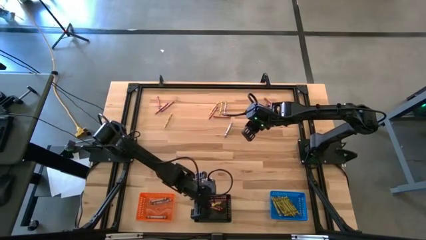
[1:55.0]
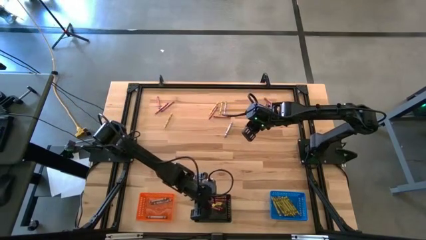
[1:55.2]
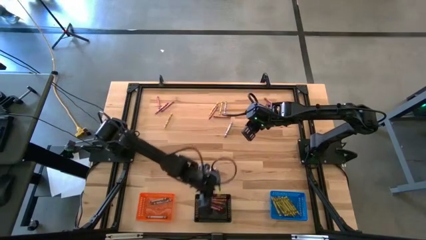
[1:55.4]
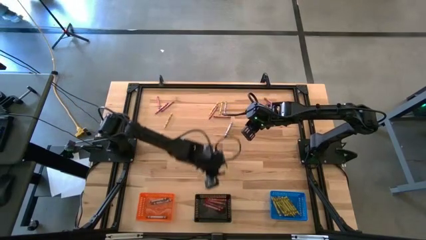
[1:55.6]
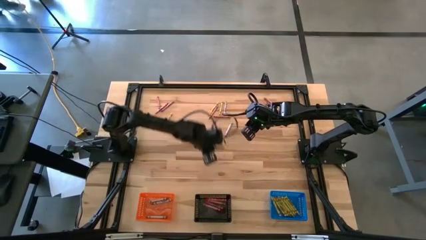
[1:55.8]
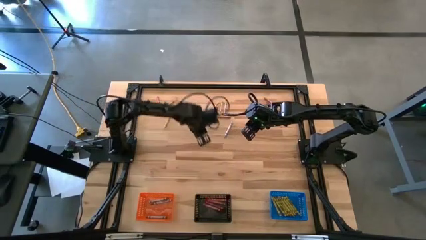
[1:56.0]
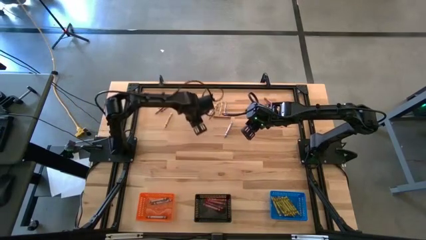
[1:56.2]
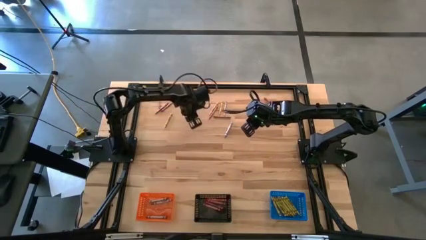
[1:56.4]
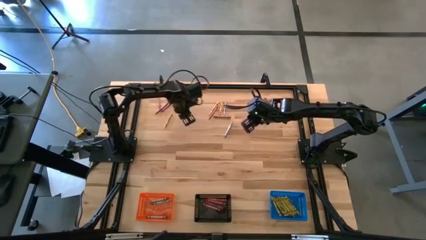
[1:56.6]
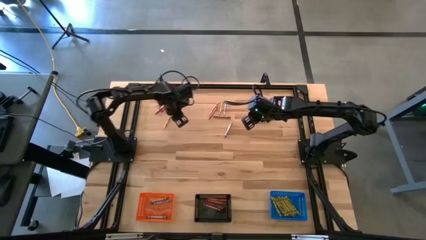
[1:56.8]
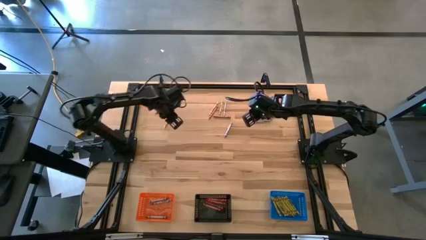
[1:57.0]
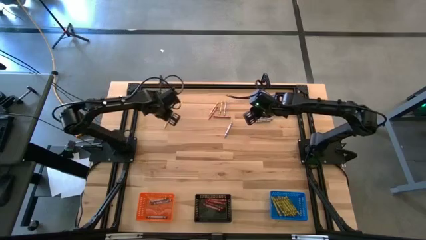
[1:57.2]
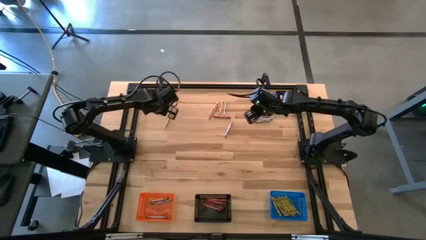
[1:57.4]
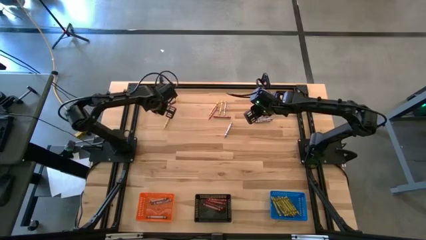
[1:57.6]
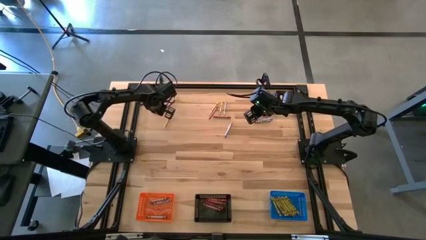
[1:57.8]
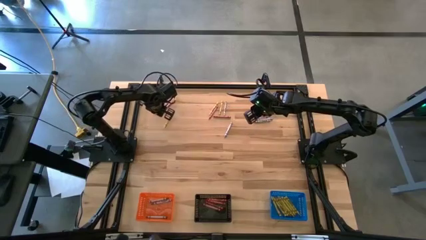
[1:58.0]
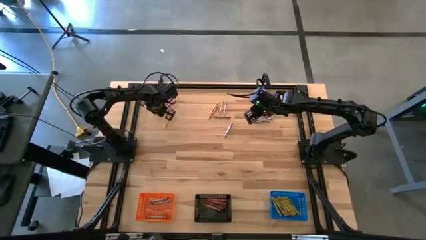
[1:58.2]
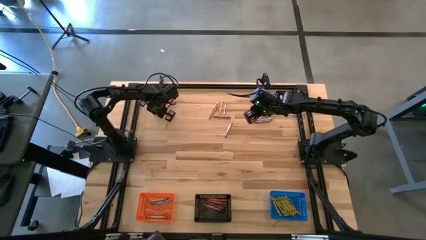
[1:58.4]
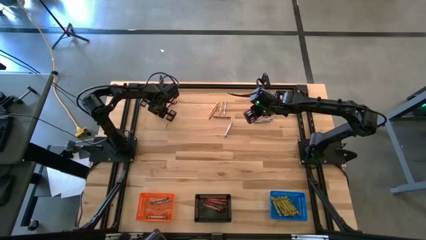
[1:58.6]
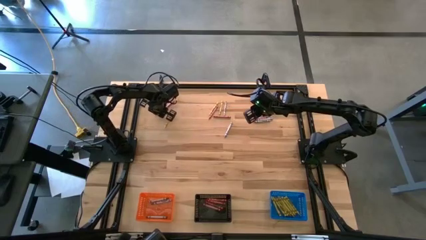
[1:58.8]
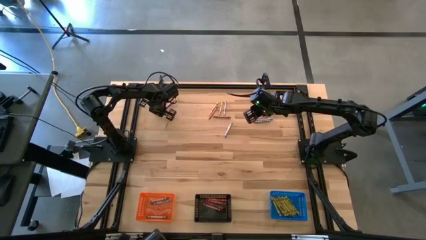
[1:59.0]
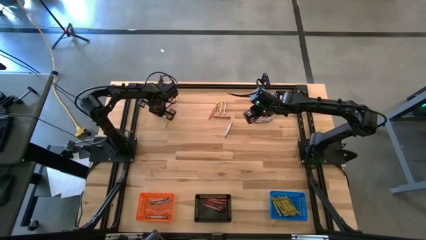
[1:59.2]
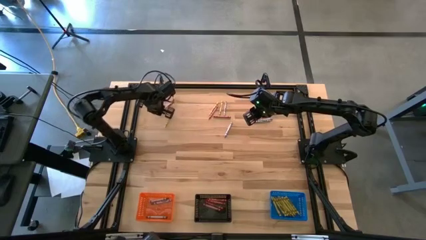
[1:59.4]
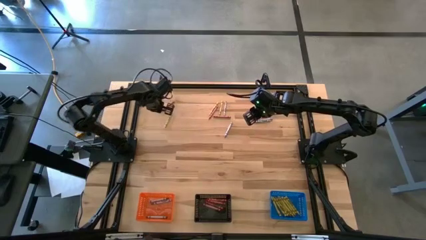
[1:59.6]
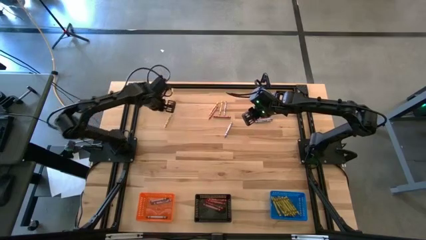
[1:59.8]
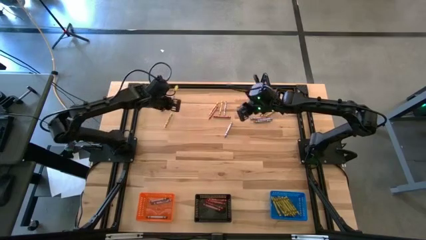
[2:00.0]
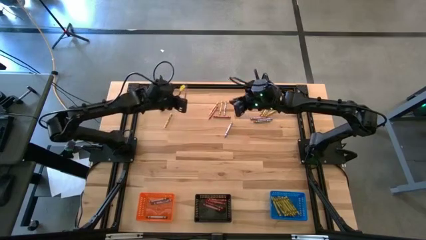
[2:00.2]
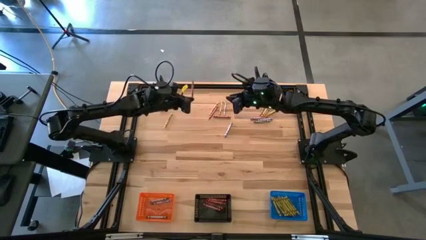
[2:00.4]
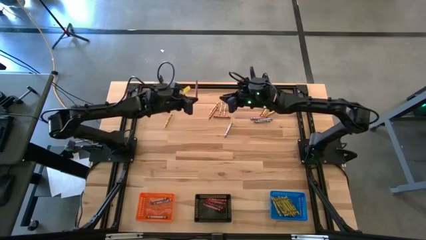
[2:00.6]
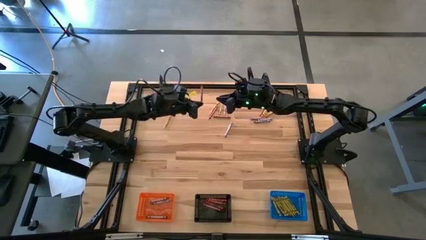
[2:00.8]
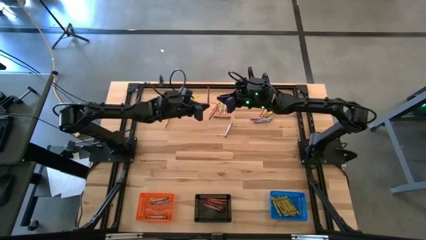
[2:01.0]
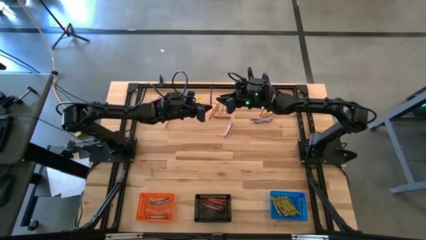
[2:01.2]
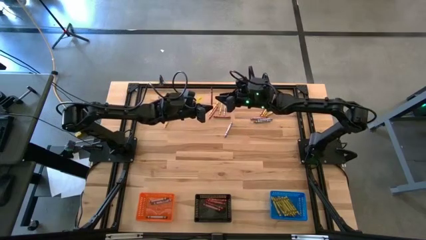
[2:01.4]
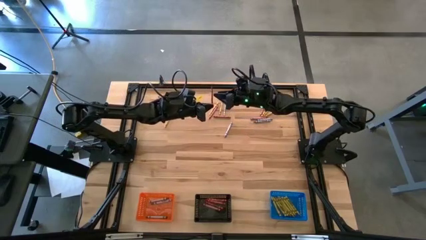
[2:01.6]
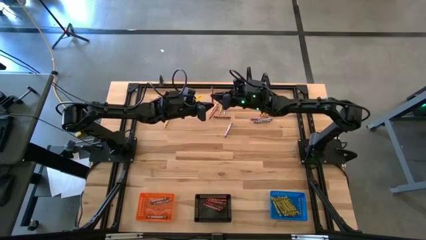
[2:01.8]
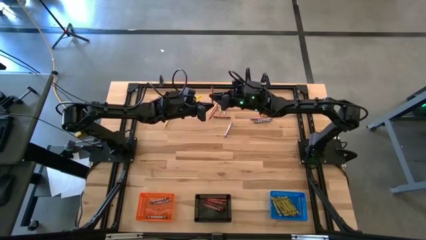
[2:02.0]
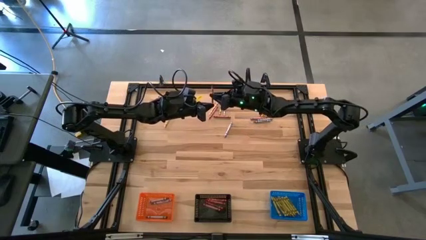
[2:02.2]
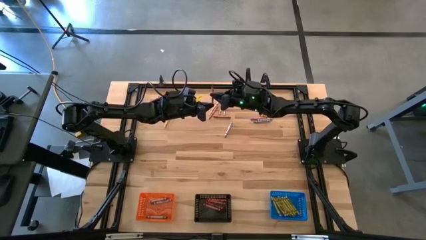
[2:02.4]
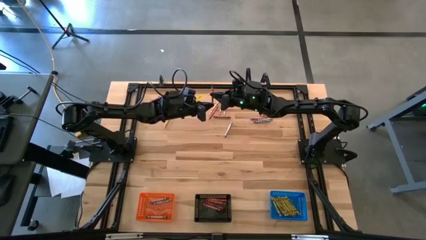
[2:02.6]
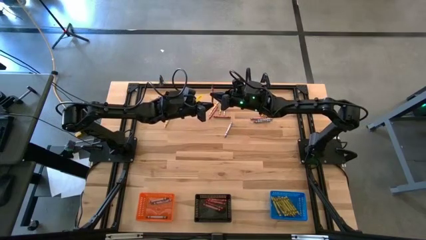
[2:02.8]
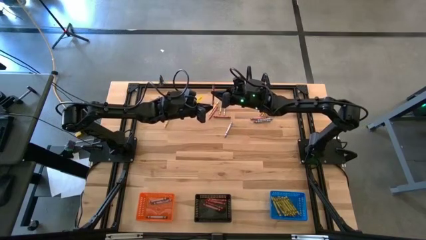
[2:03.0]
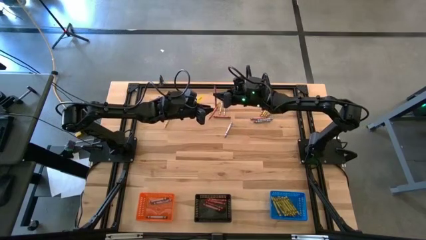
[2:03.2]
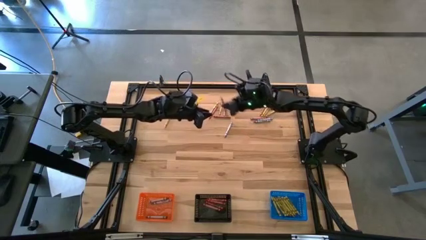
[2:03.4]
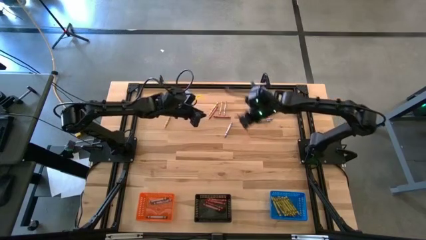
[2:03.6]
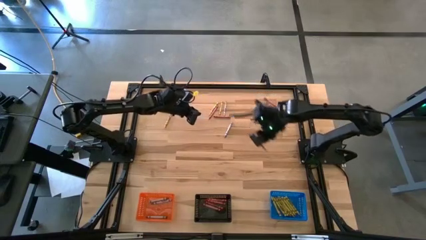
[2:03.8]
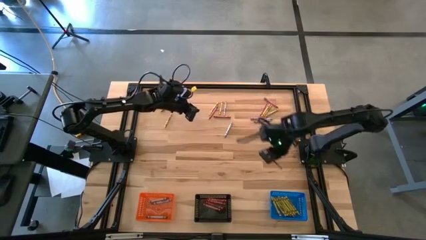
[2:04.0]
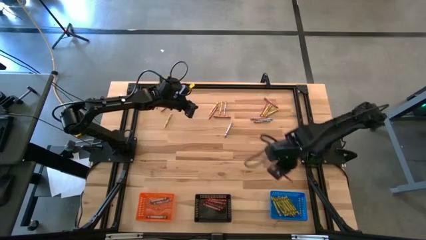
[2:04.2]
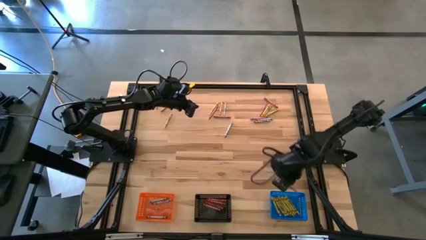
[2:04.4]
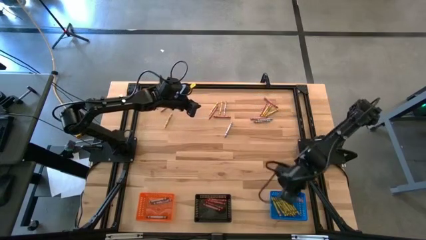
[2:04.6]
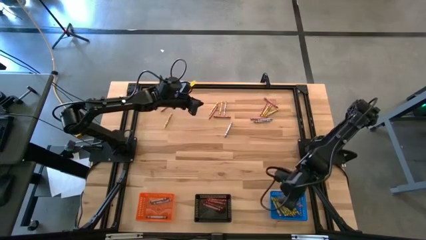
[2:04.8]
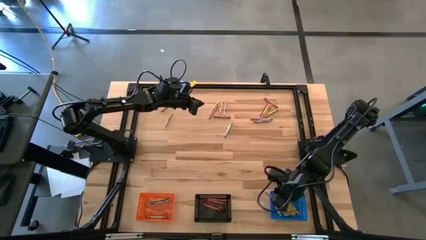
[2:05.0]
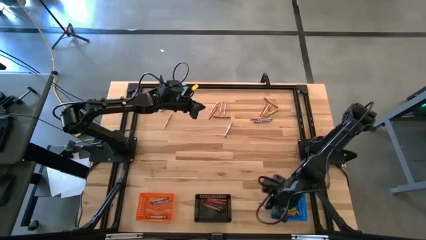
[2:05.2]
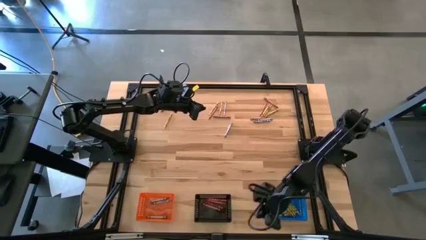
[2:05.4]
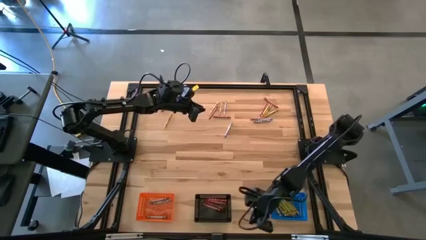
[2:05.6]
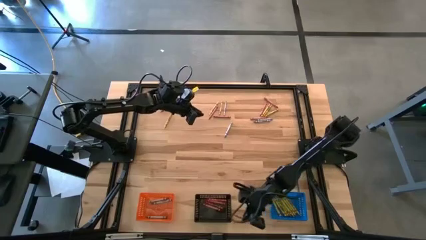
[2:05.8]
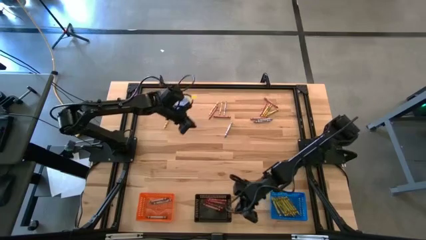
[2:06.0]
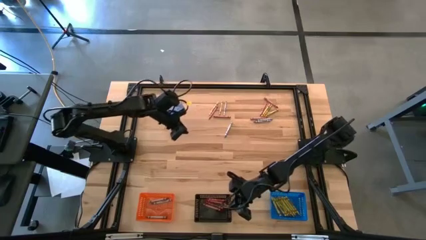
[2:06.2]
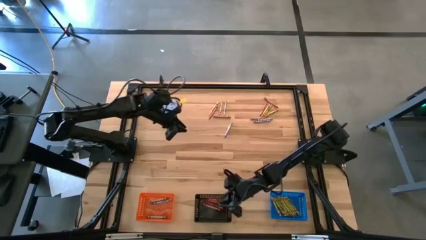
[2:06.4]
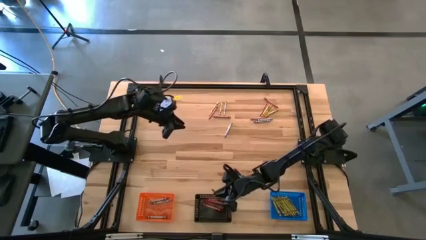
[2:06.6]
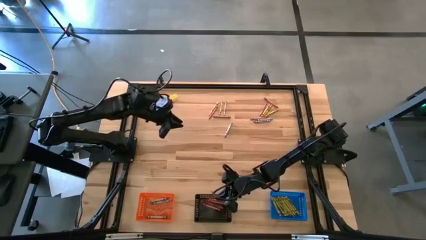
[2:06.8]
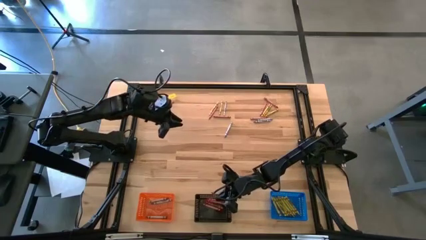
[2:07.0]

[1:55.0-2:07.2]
Task: Sort crayons
Put the red crayon into the black bin

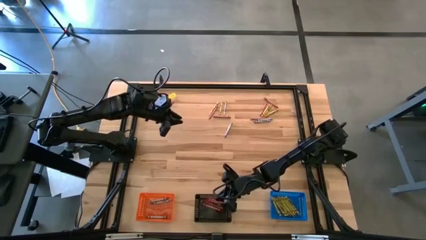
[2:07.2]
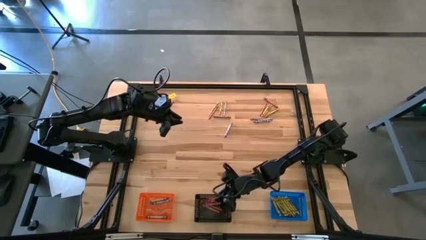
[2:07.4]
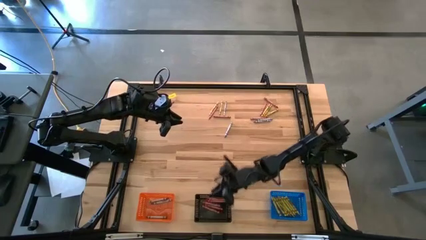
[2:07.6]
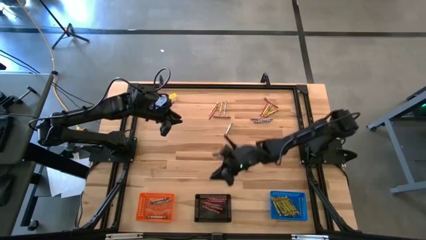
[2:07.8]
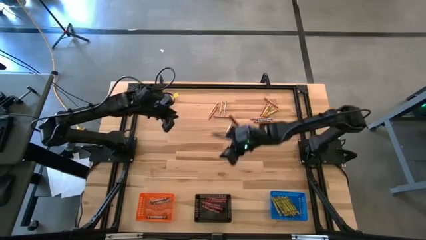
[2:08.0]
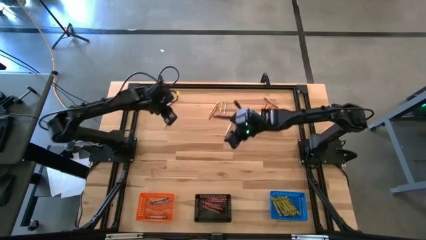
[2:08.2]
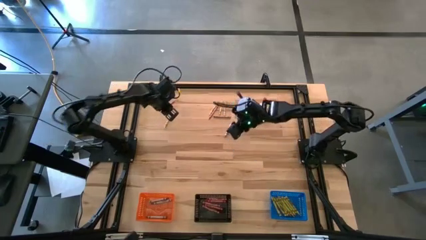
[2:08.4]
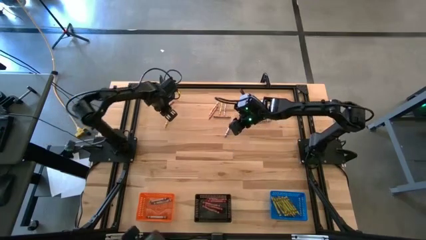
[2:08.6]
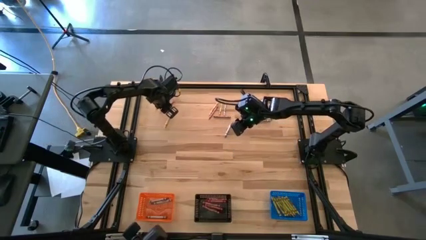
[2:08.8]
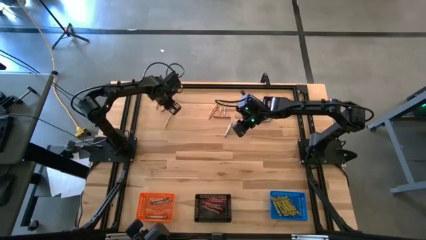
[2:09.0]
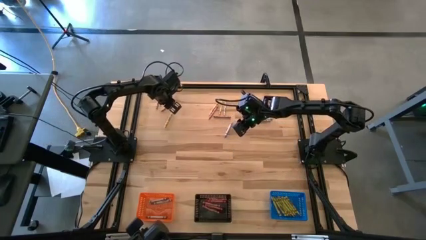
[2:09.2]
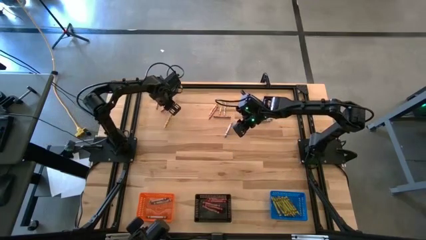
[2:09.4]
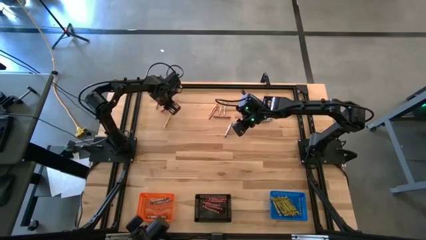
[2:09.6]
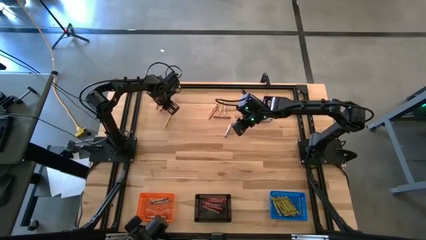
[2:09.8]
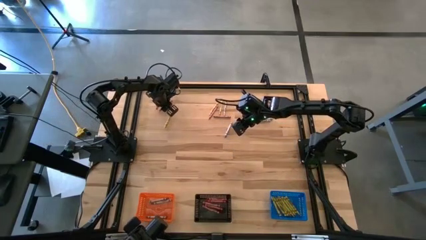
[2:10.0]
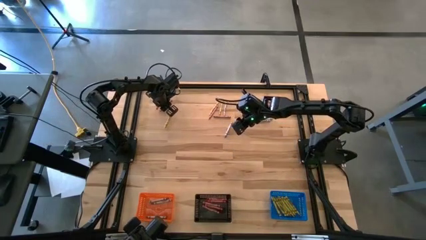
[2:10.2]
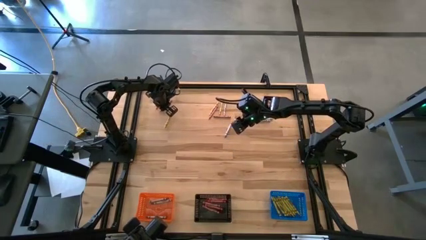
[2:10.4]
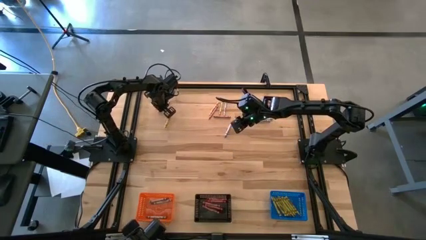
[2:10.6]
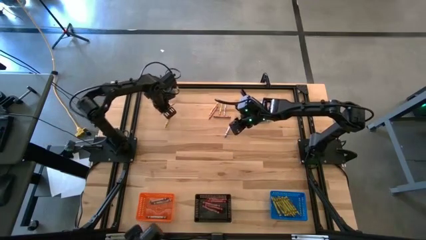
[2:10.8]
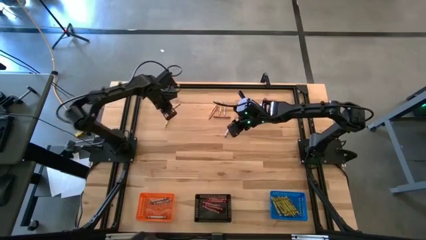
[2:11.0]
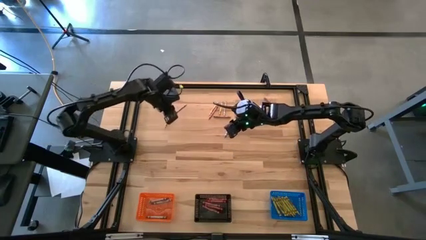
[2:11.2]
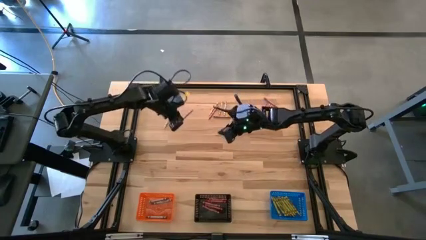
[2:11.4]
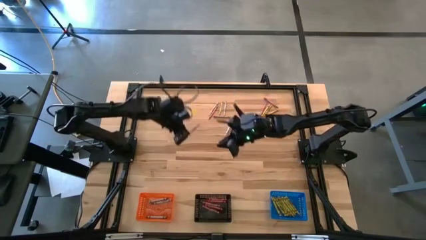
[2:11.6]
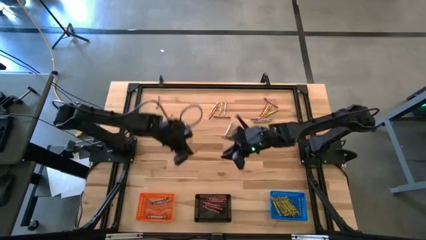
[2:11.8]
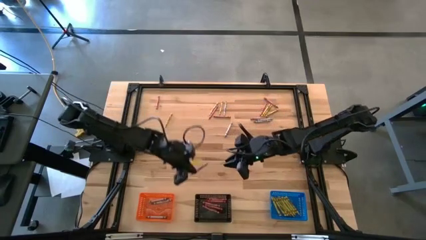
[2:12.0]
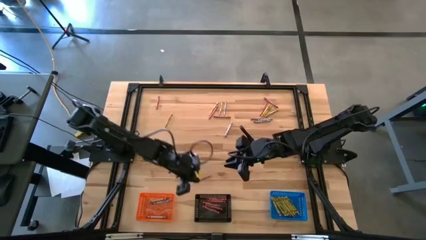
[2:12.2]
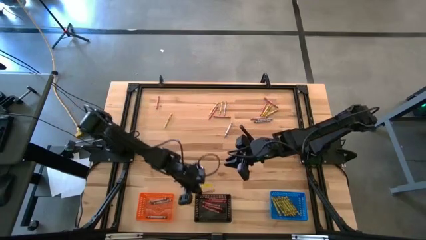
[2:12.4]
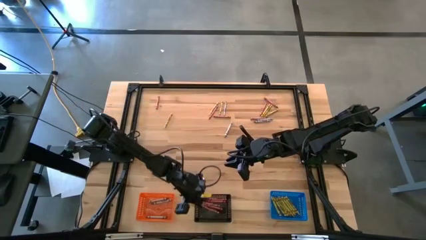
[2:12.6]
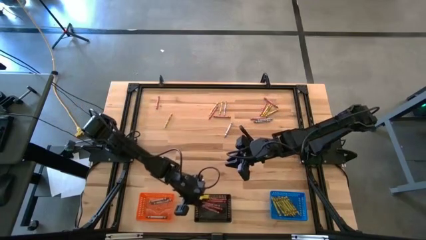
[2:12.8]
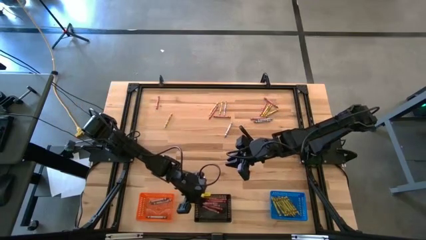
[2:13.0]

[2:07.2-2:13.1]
Put the red crayon into the black bin
